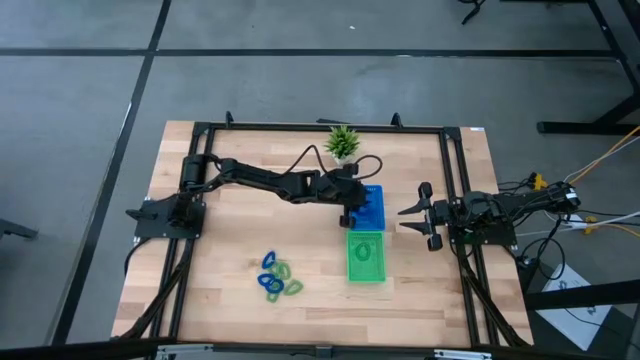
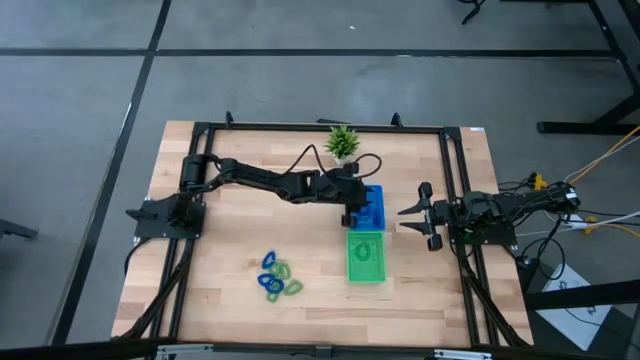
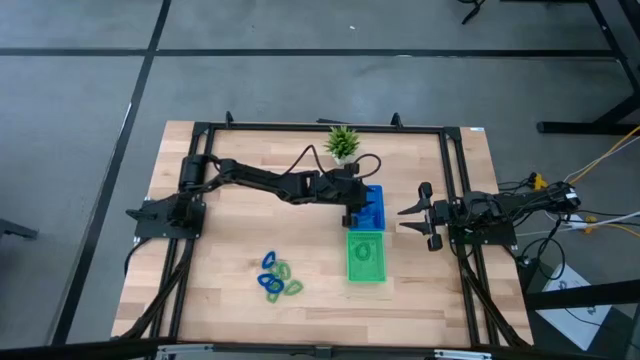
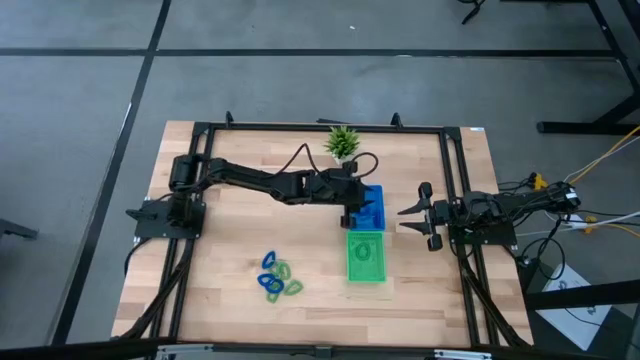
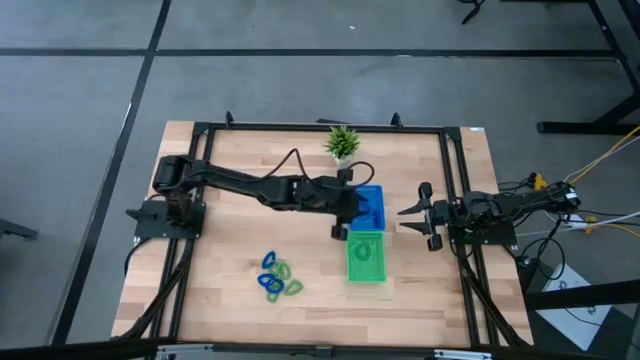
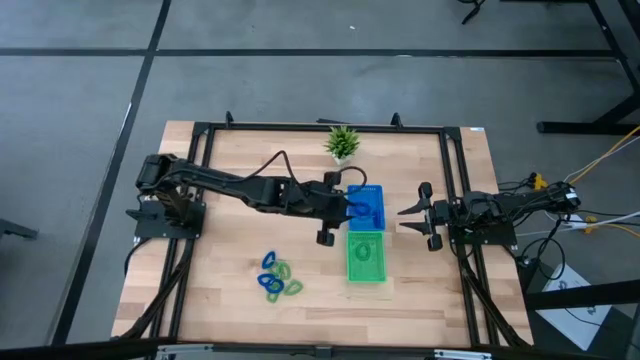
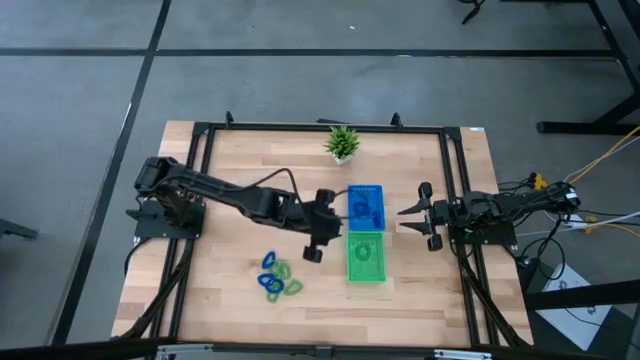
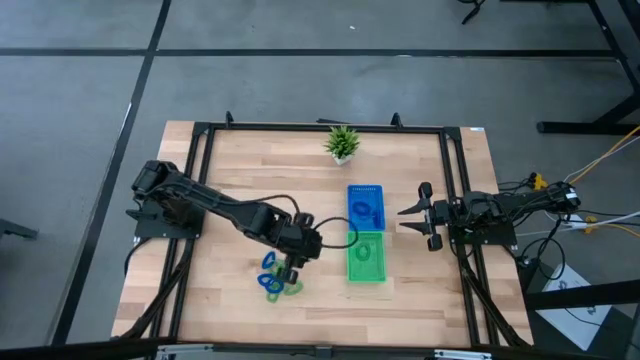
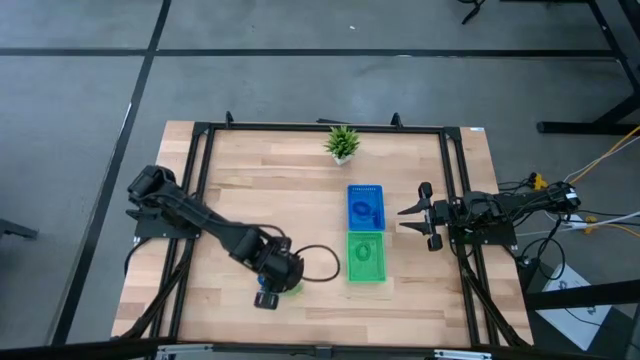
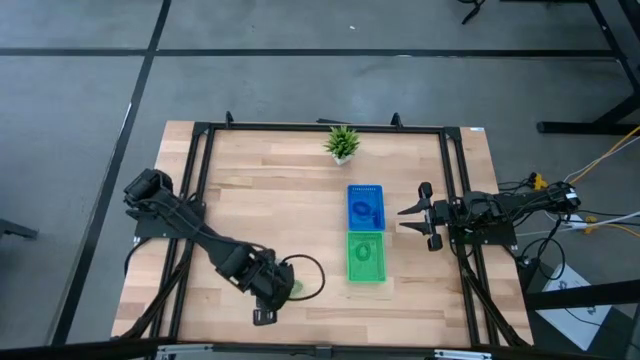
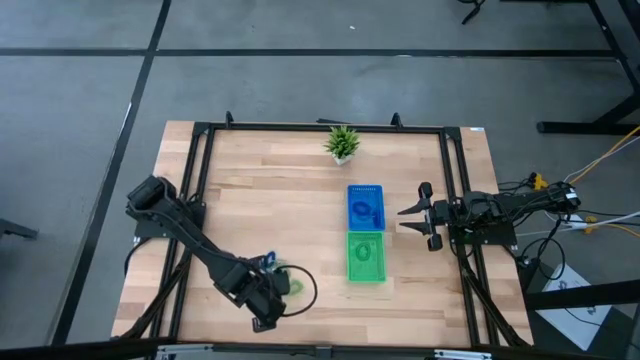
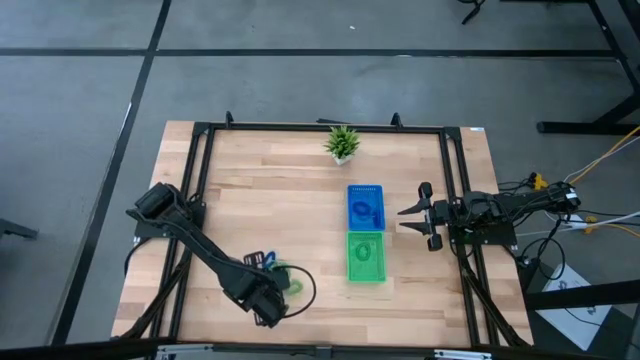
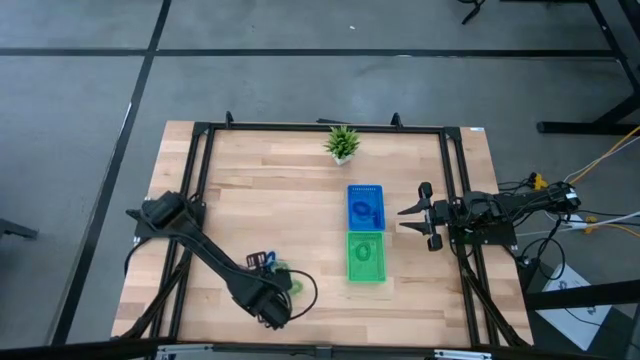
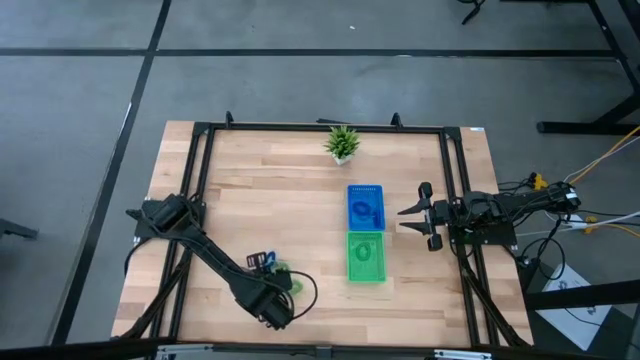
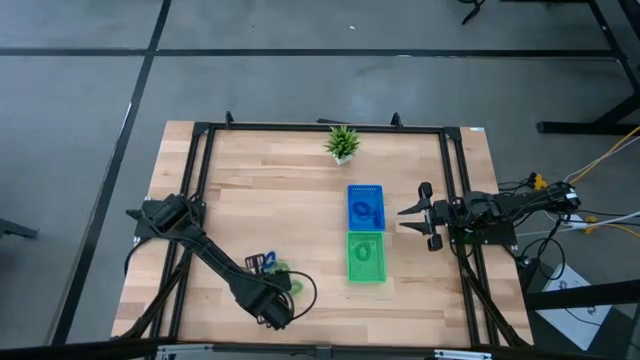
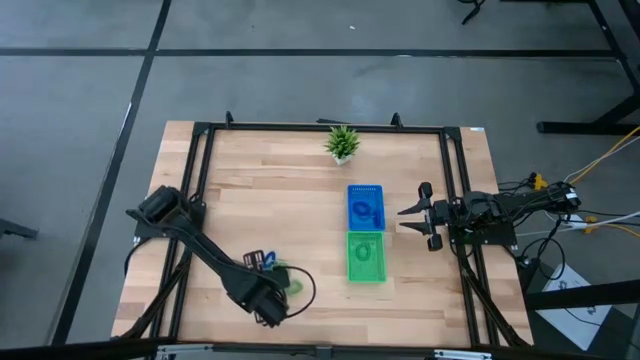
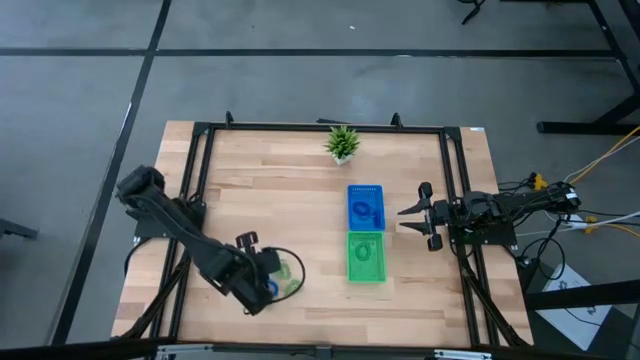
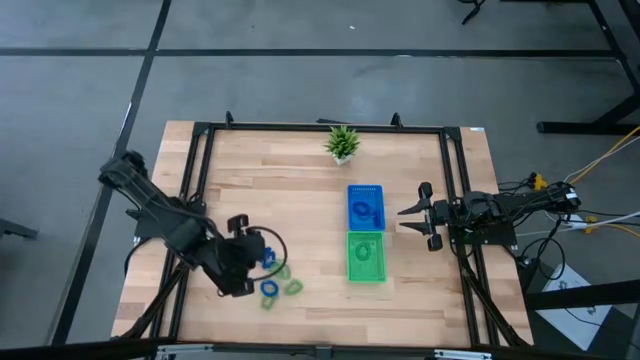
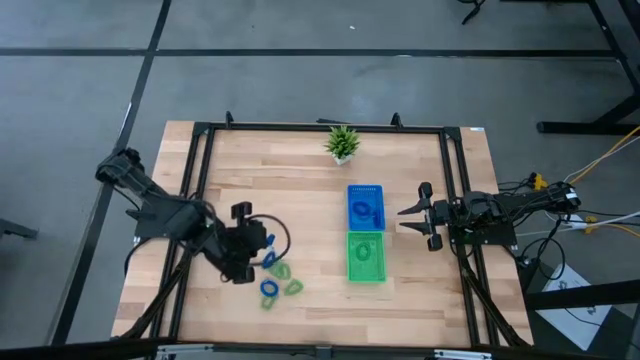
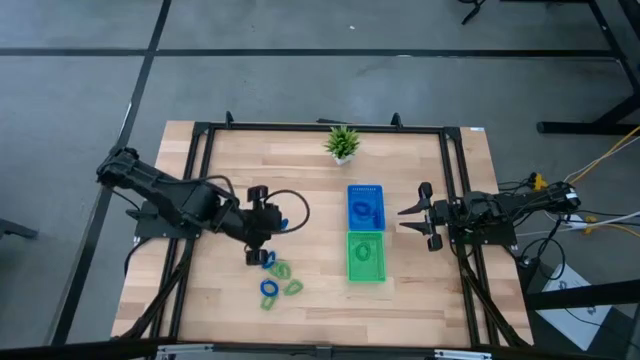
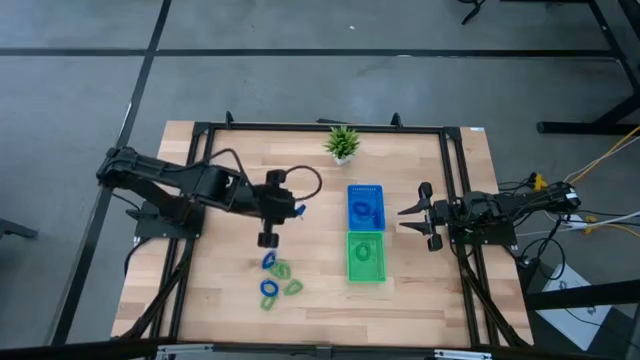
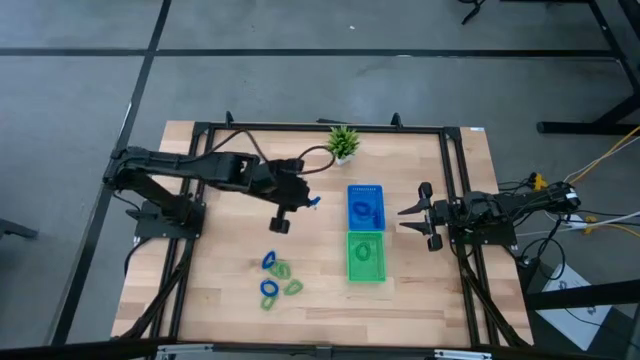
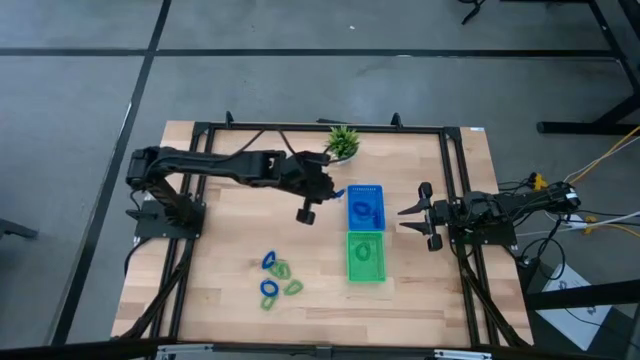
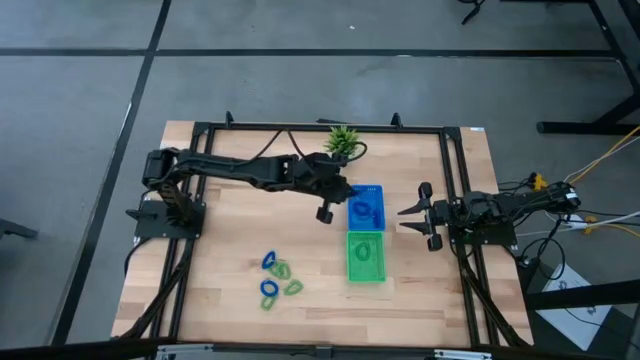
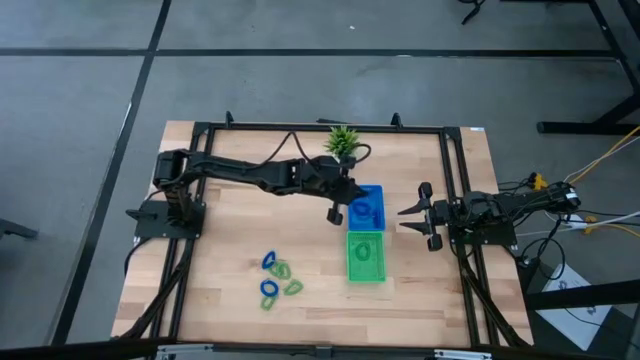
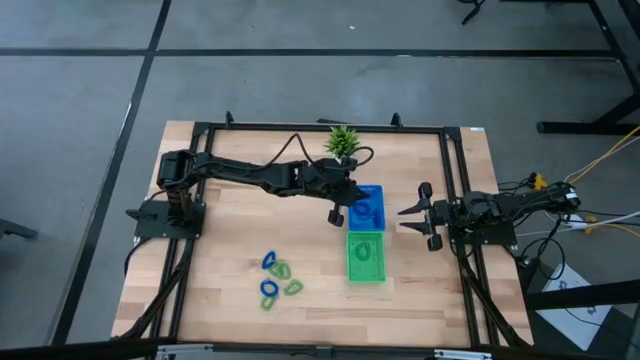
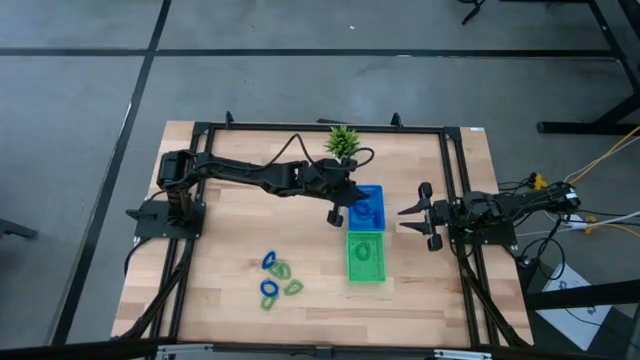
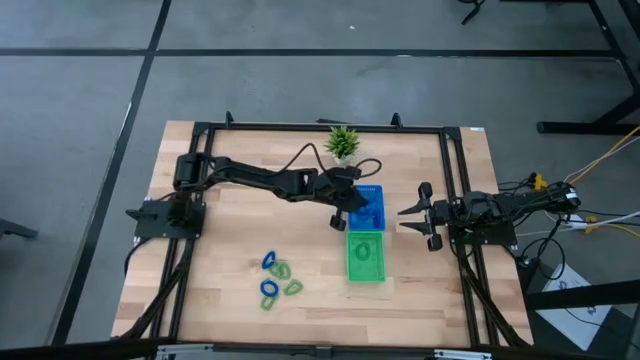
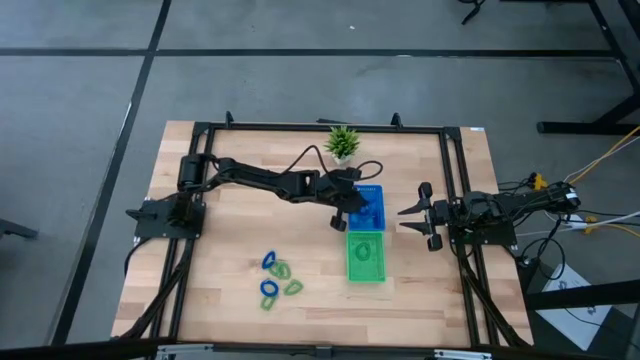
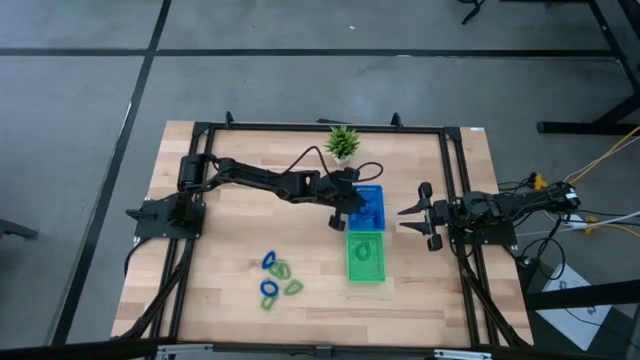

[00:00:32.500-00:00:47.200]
Task: Sort spring keychains
Put the blue spring keychain into the blue bin

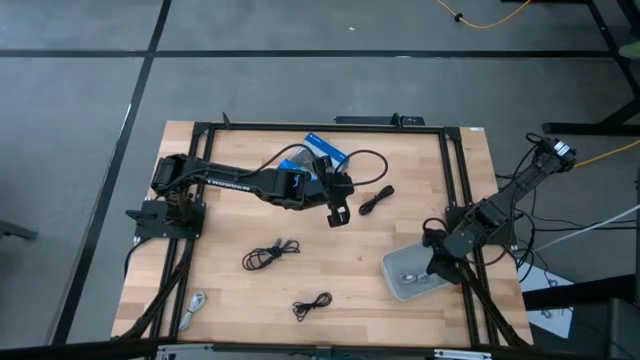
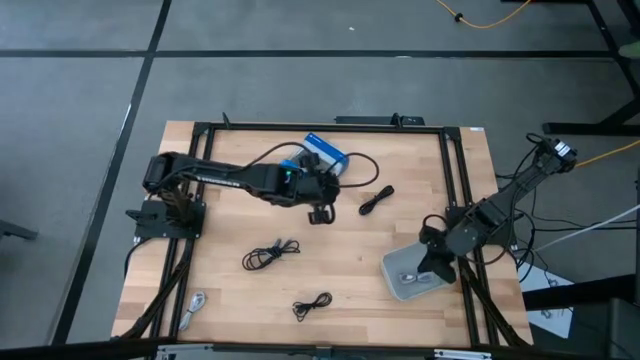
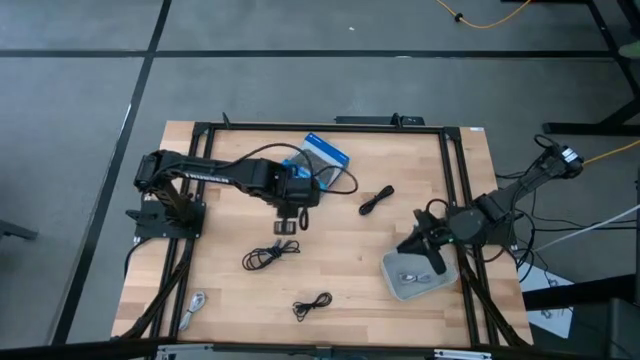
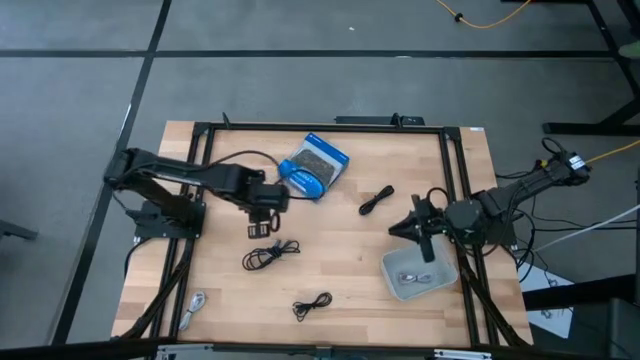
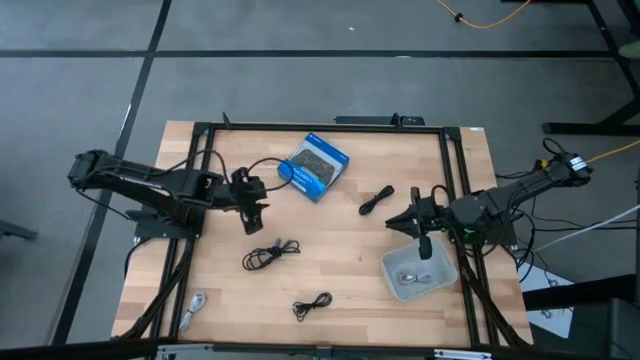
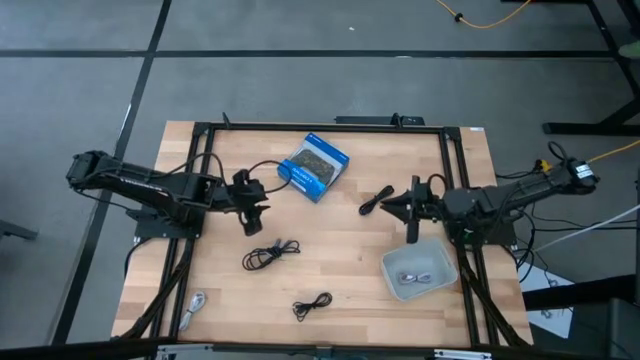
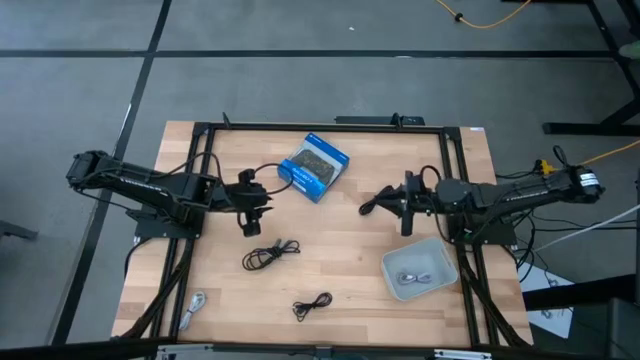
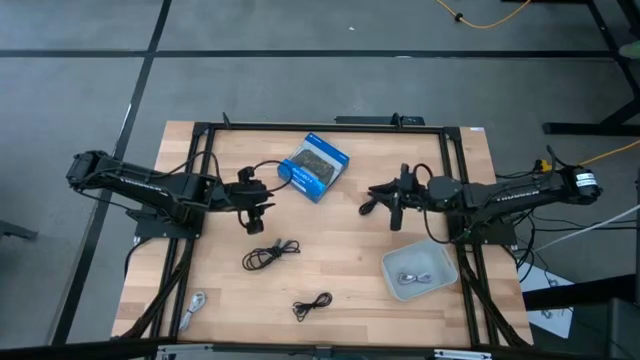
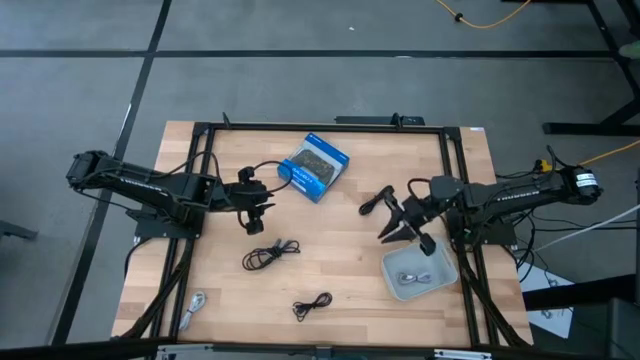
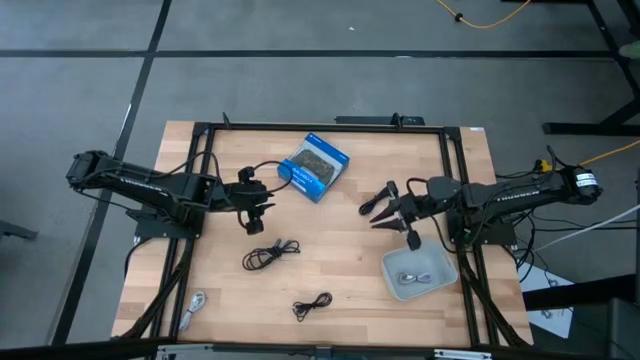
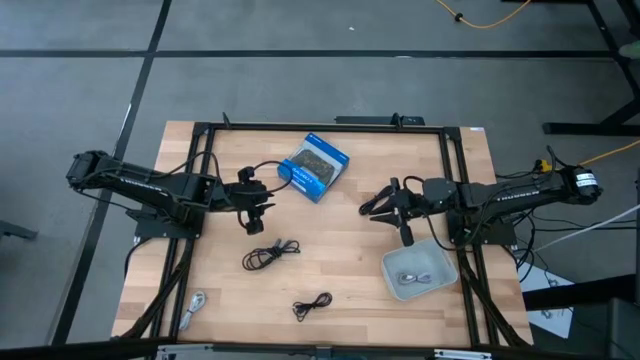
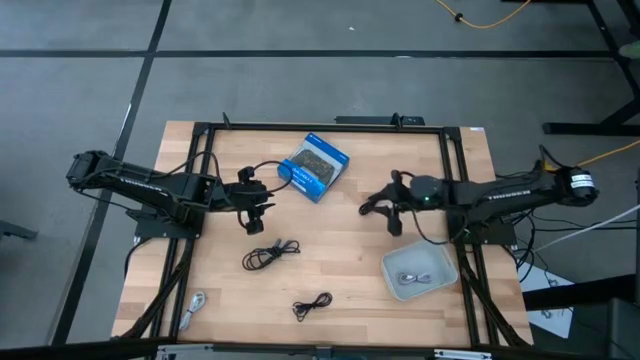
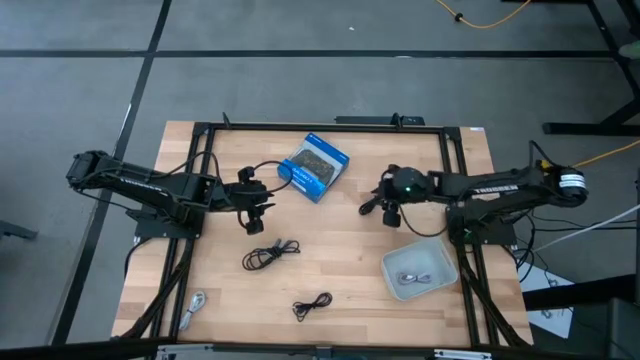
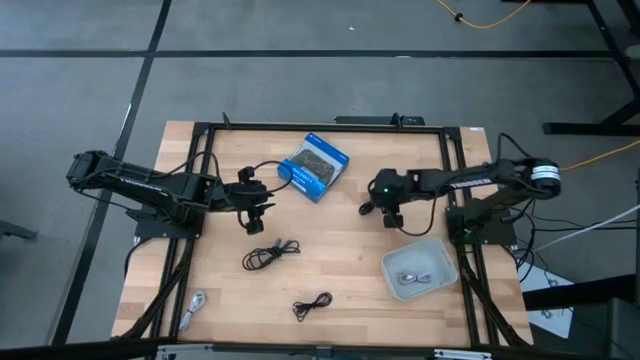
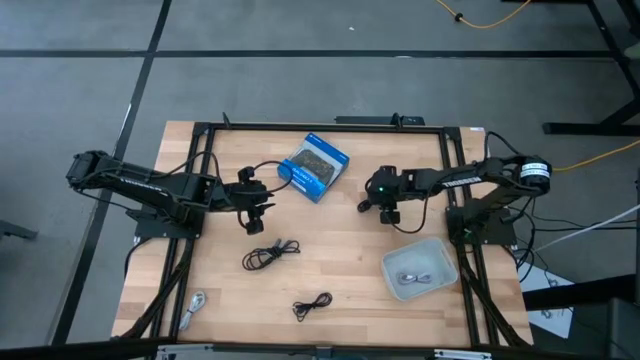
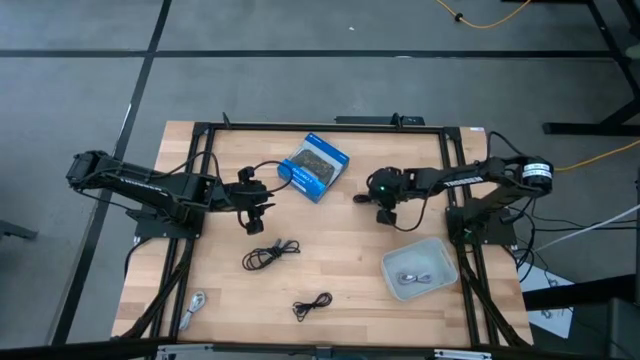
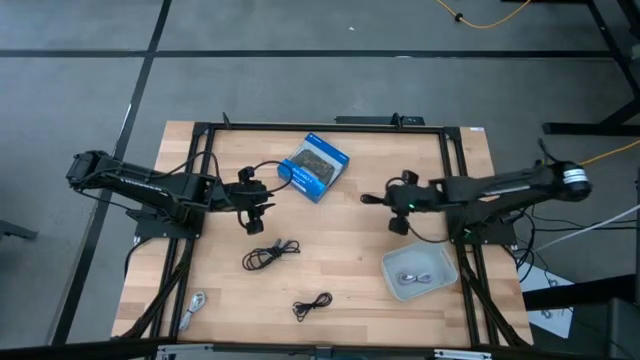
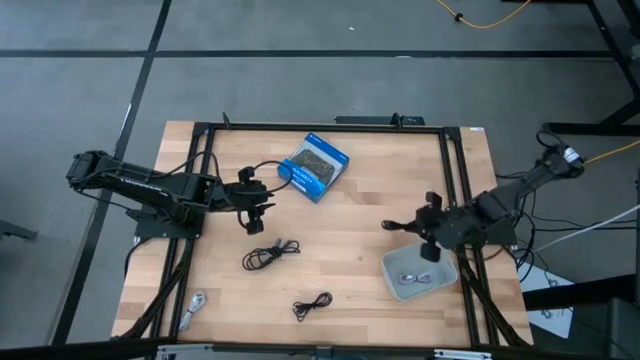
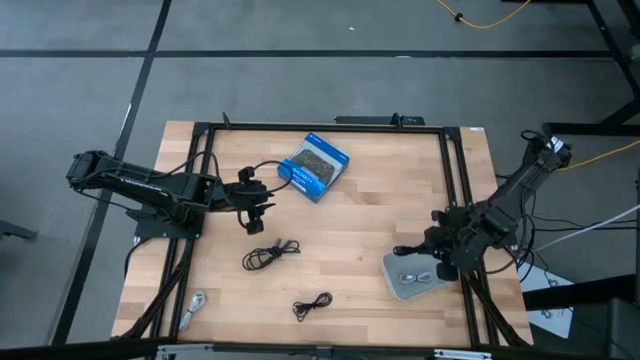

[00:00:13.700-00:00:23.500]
Task: Pick and place USB-C Cables
Put the top black charger cable into the gray bin
